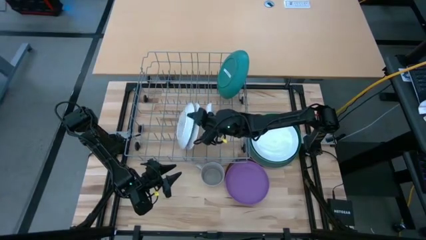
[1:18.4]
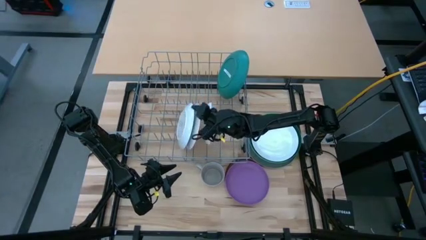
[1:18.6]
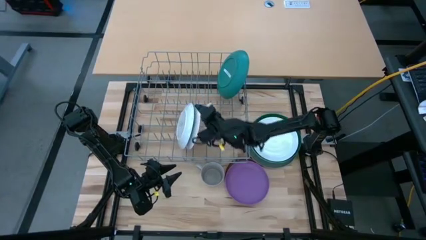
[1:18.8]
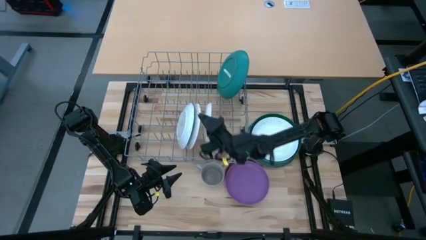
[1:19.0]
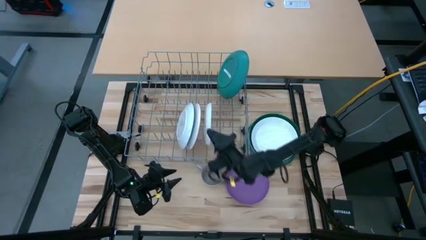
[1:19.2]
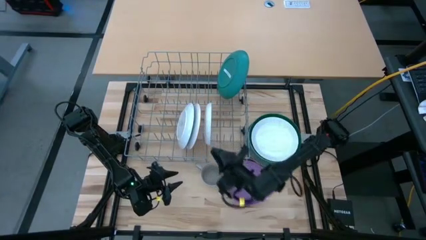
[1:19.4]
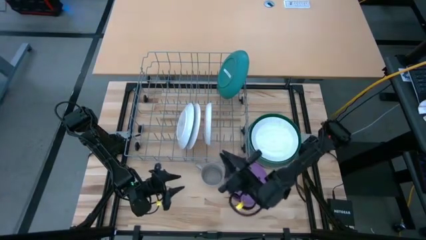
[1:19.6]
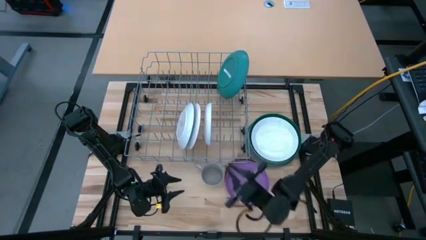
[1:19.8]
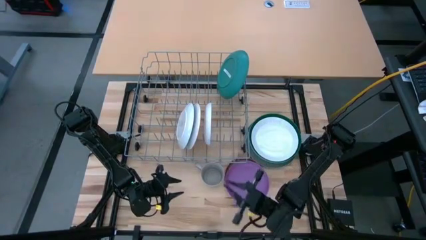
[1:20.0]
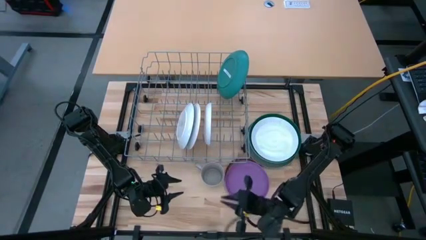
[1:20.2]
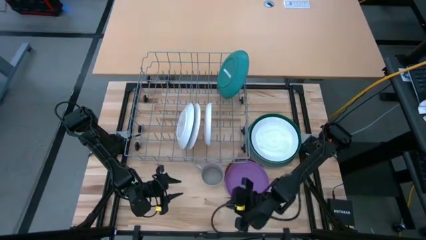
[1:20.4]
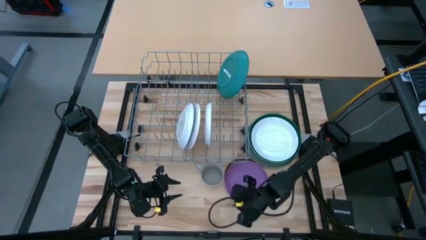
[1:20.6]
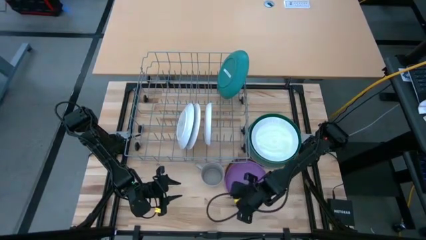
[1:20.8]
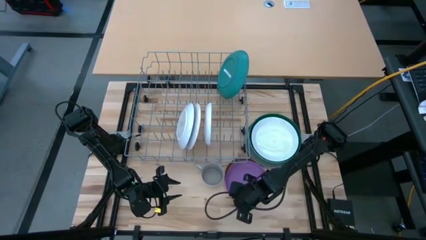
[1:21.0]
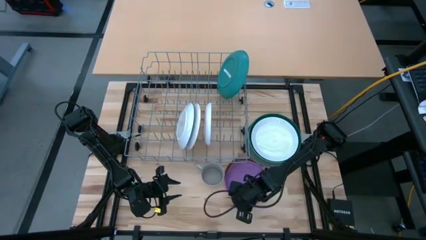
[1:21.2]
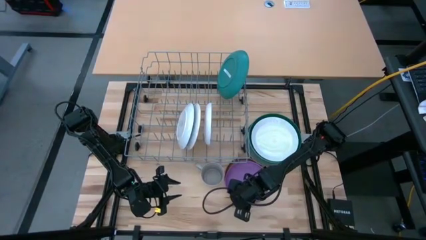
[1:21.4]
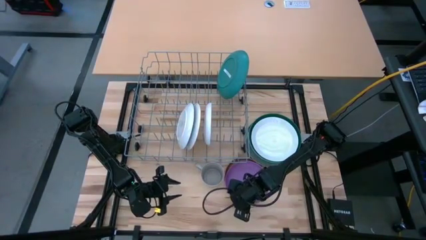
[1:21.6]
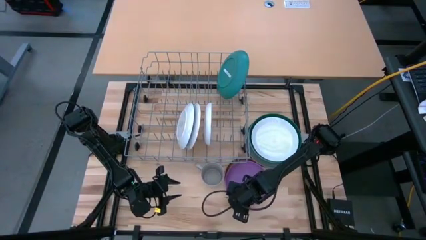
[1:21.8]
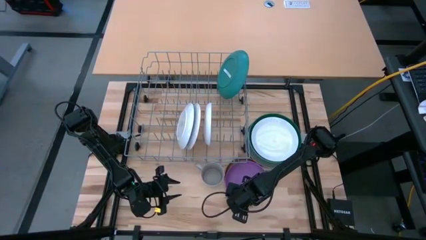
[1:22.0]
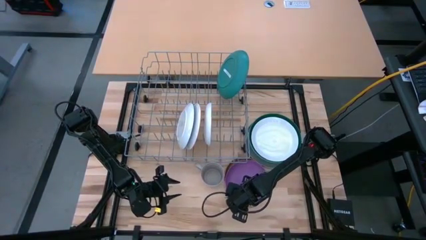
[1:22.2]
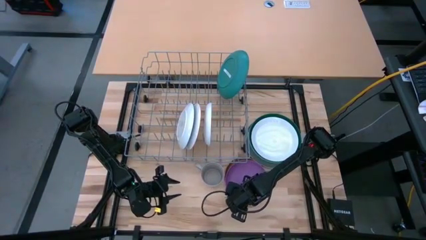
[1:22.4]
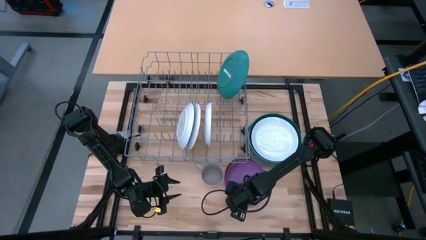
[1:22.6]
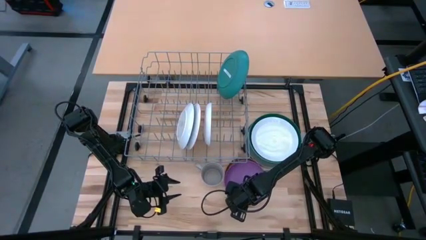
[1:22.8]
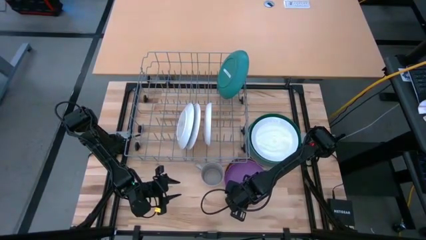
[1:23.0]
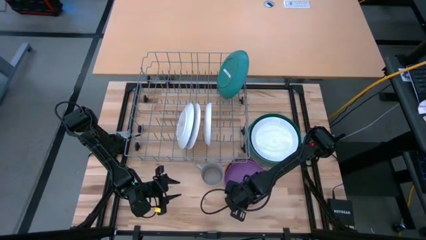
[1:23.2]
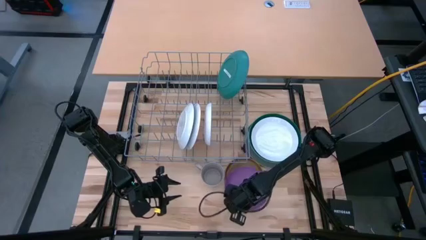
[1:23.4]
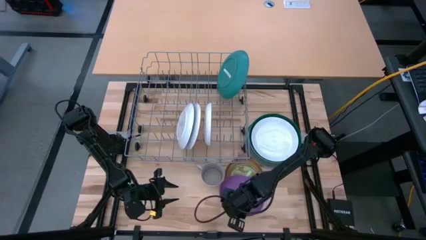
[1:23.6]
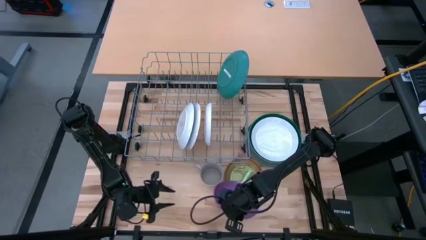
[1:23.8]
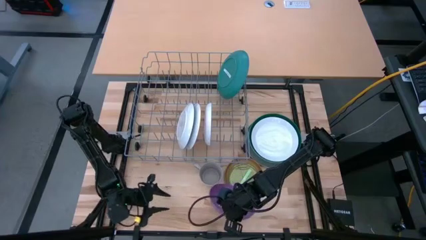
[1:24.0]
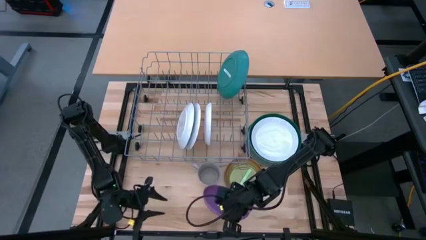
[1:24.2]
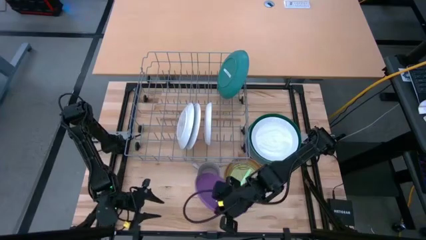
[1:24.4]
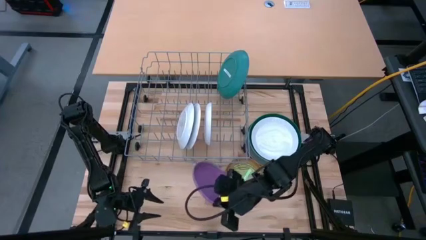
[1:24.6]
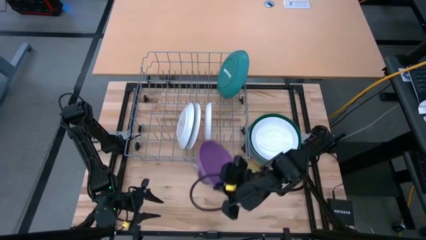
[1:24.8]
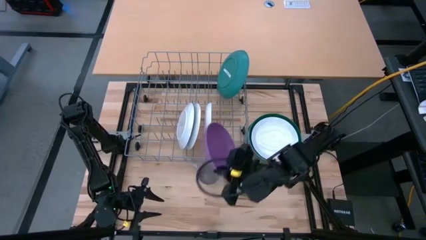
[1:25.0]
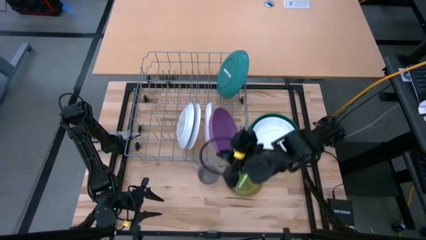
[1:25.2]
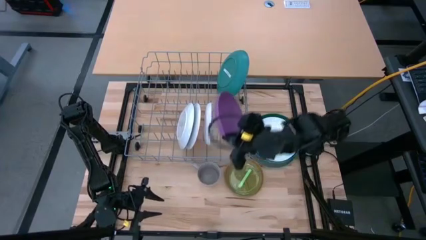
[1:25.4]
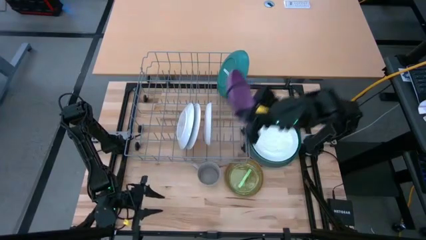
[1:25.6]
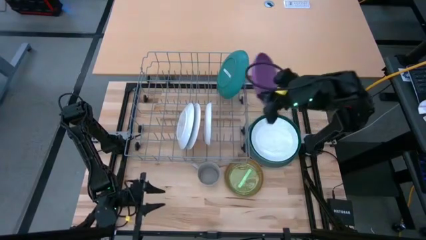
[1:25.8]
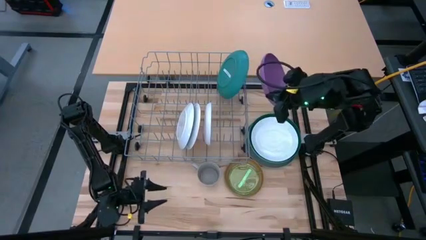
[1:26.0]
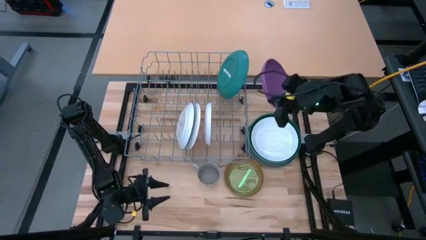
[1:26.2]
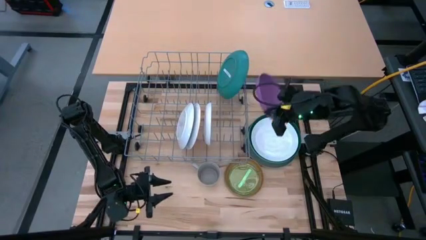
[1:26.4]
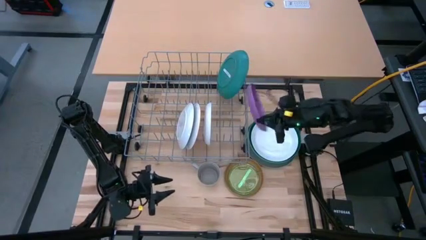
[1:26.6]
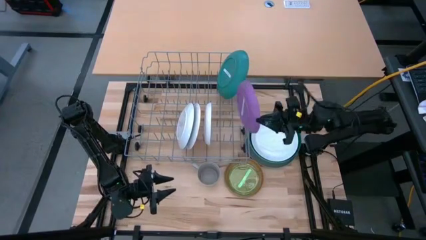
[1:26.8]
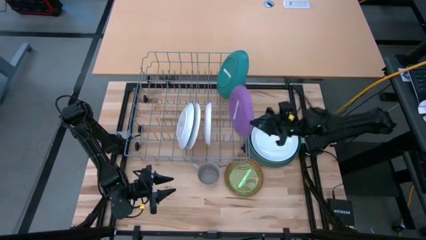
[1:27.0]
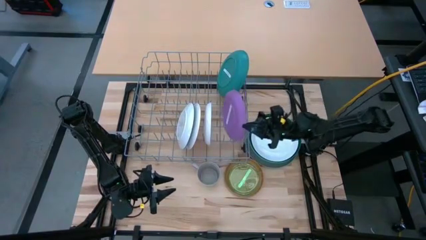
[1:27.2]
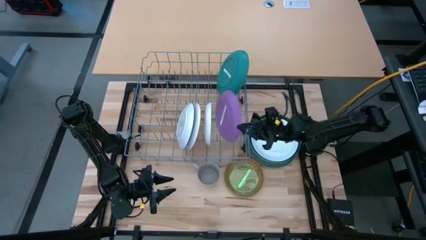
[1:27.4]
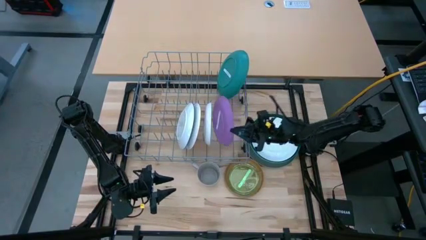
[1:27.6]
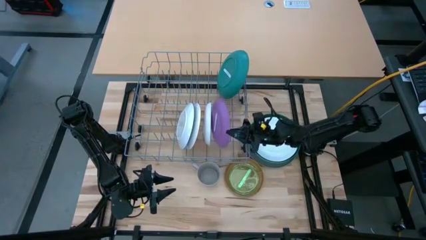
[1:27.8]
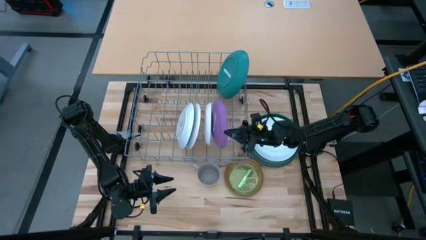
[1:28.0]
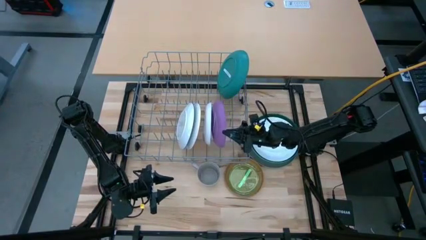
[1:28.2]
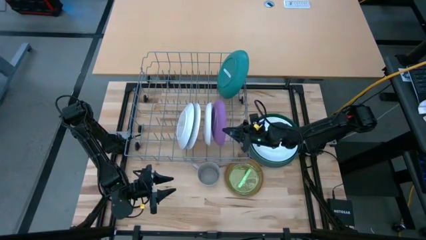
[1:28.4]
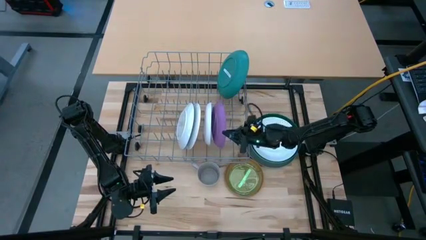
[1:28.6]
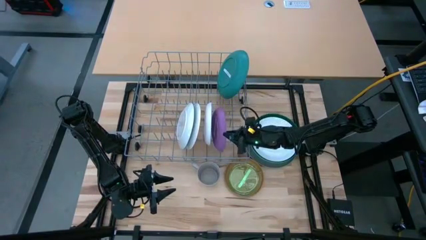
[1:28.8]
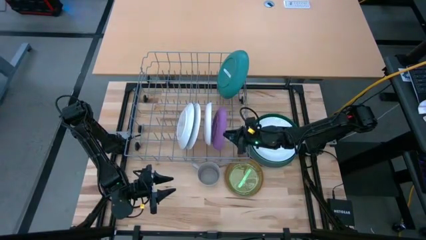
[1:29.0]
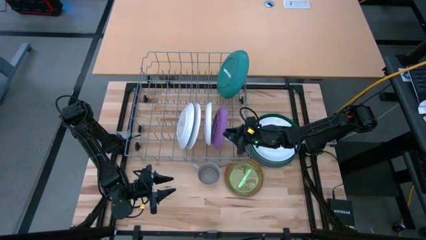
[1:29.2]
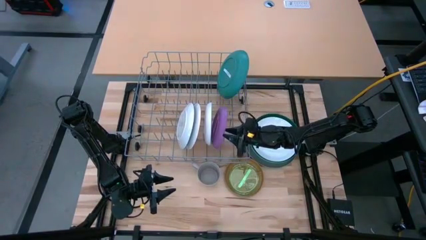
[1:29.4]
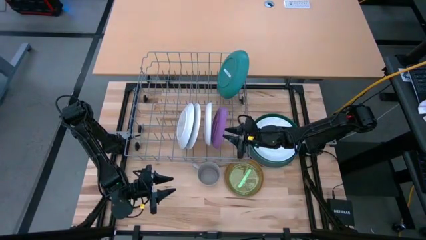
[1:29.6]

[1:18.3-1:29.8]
Task: Sort dishes
Put the purple plate in the dish rack
